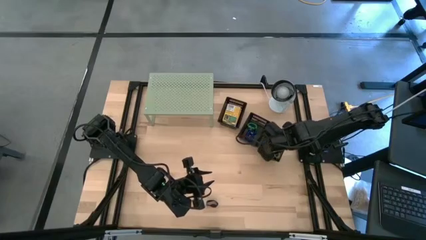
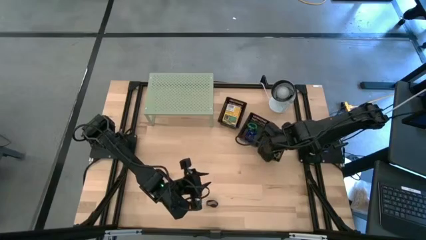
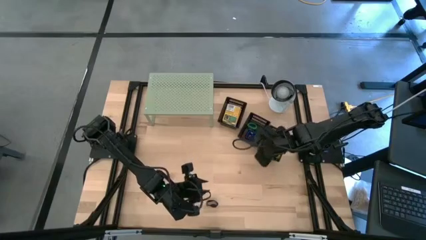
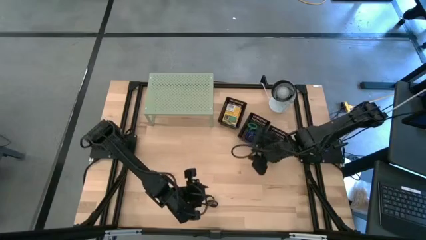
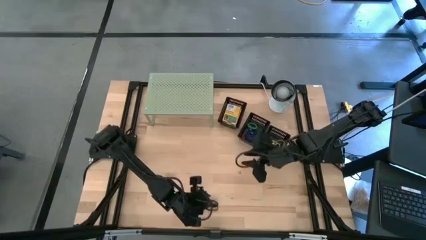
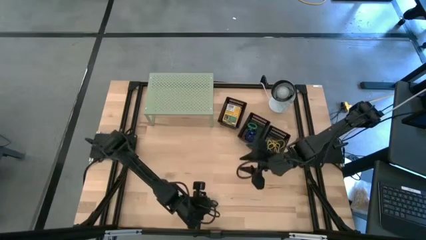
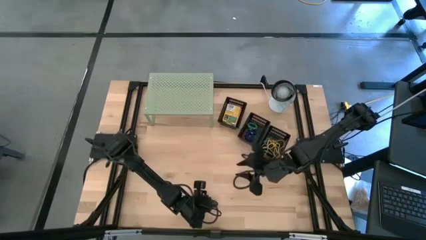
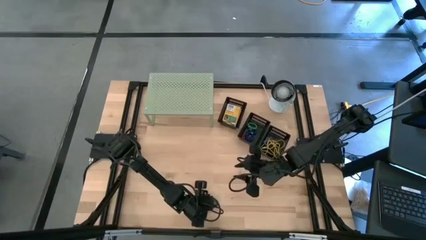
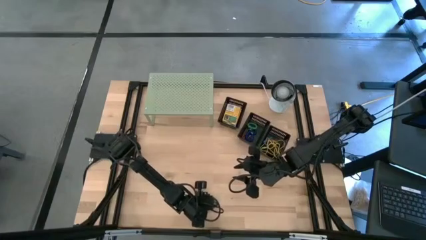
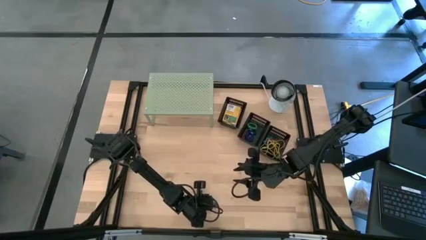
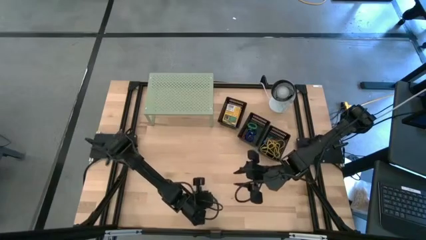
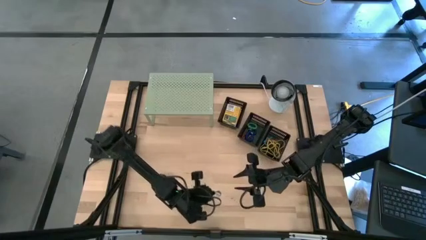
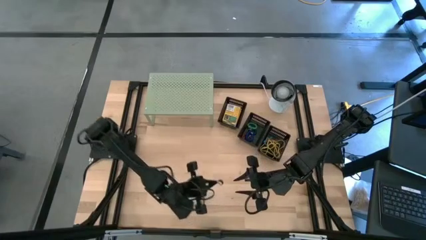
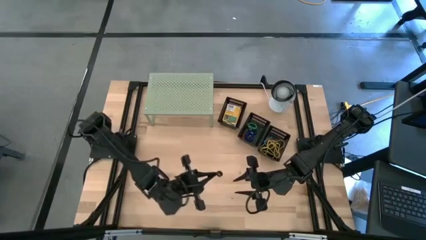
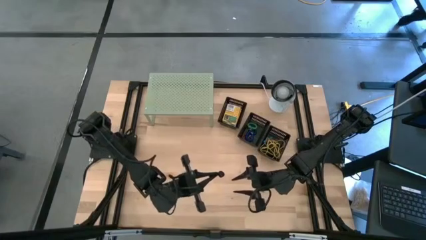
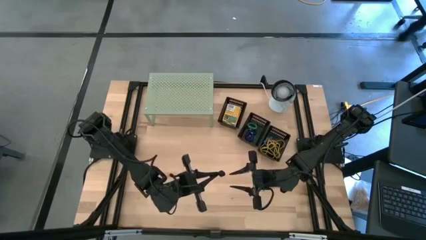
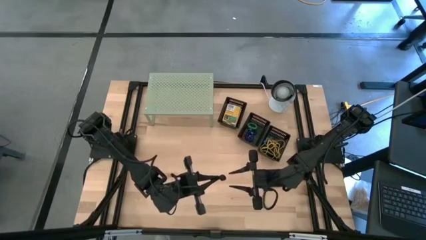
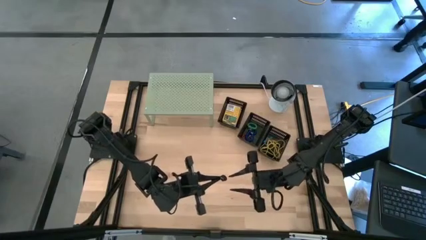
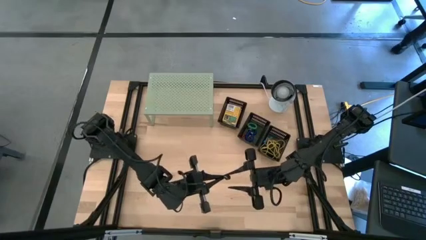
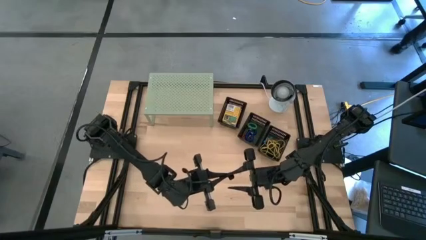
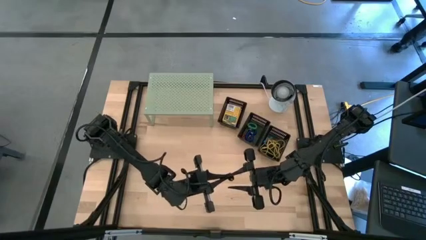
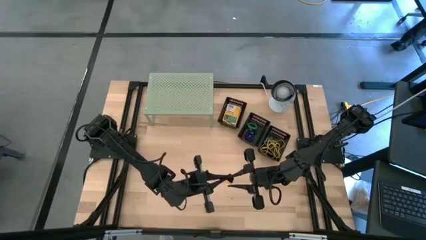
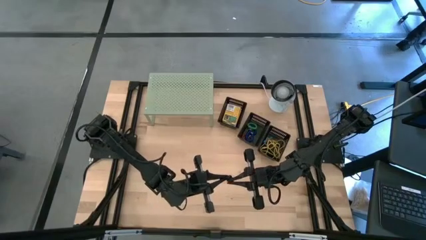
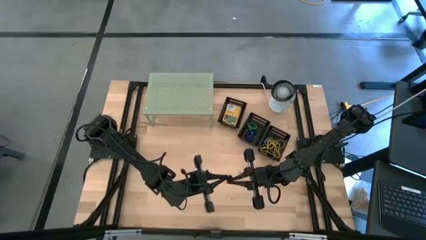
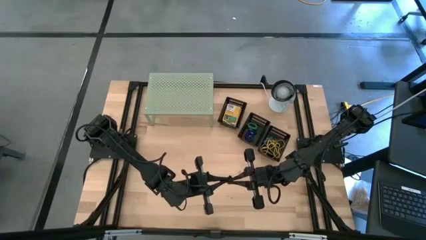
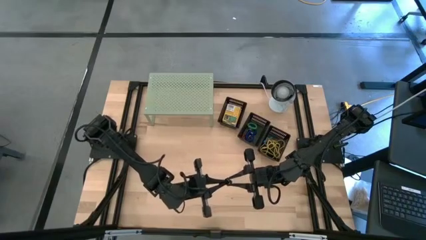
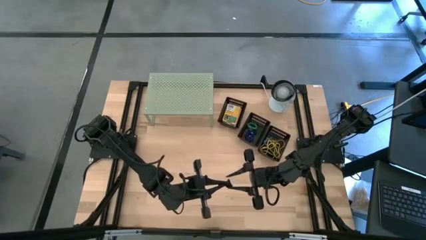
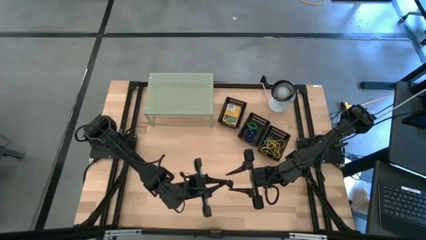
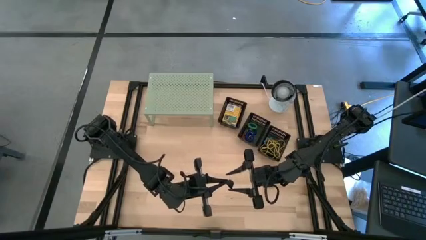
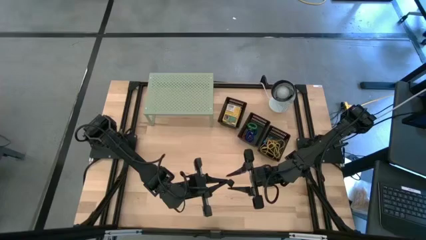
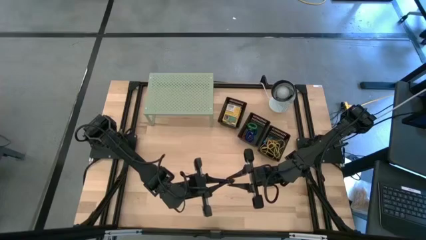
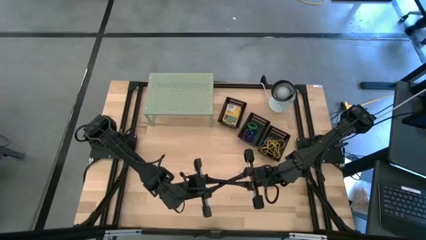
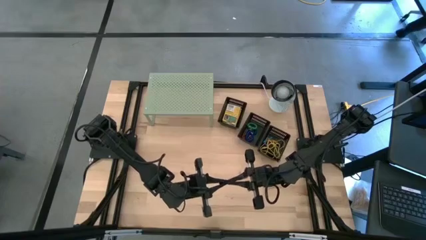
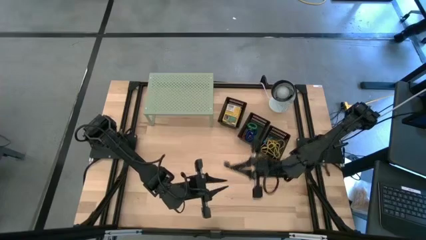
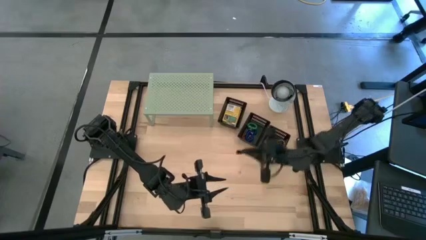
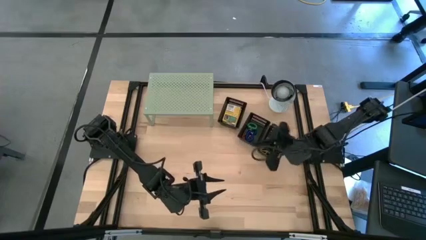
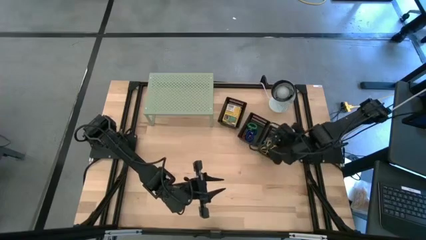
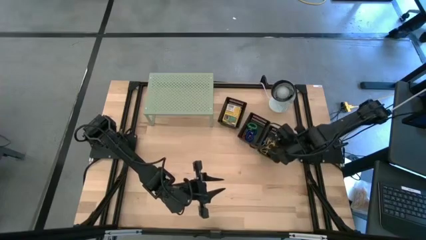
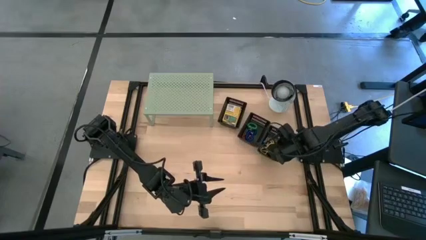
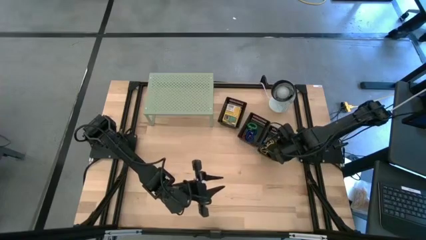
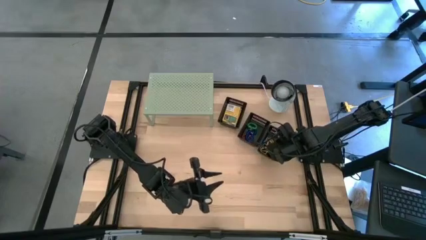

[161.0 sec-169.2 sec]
Task: Pick & Place Office Desk Supplies
Put the black rubber band into the bottom black bin
